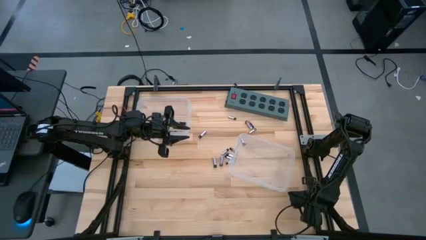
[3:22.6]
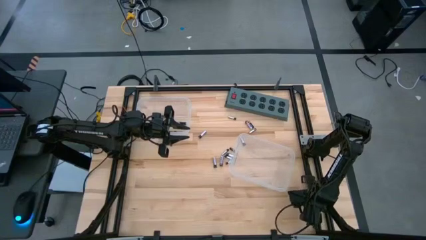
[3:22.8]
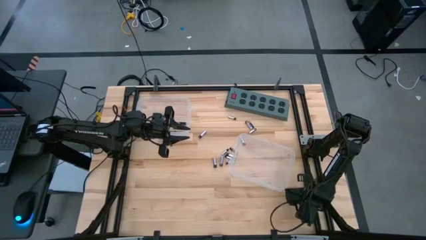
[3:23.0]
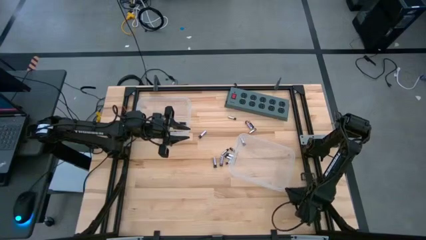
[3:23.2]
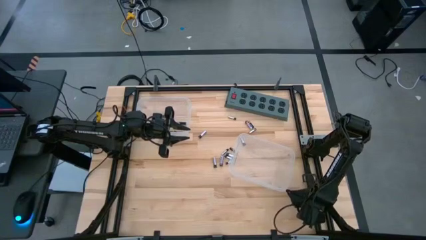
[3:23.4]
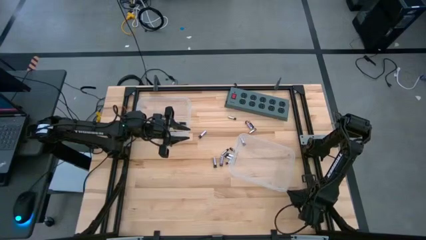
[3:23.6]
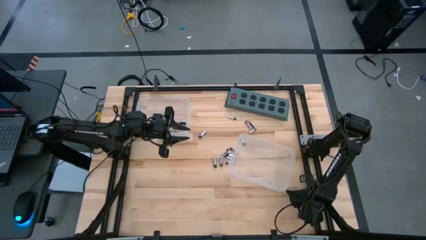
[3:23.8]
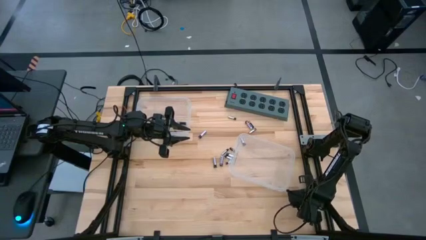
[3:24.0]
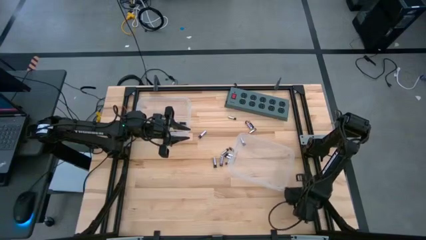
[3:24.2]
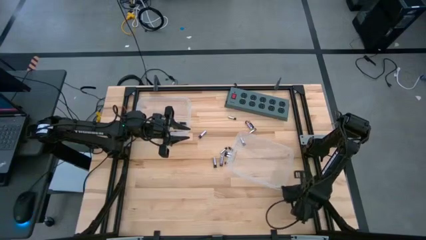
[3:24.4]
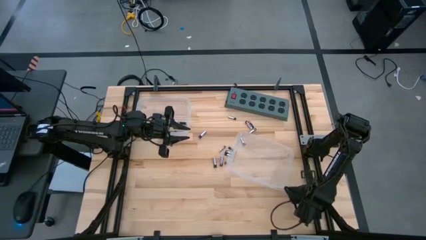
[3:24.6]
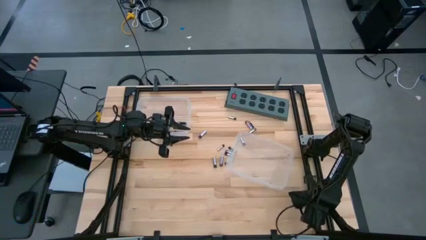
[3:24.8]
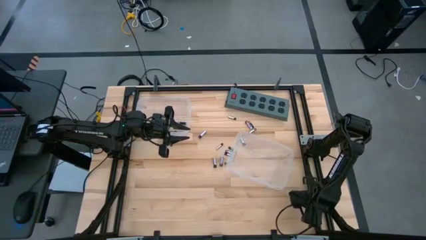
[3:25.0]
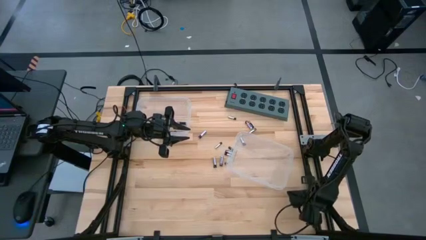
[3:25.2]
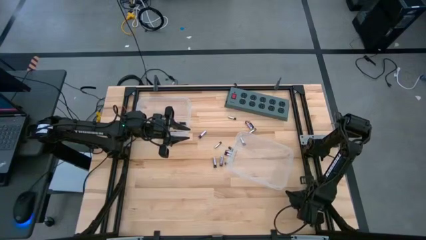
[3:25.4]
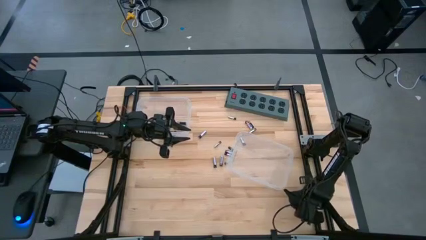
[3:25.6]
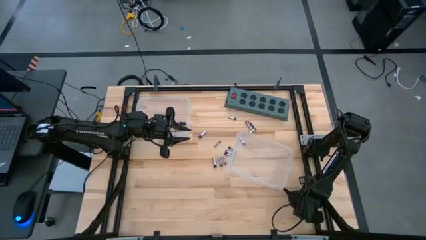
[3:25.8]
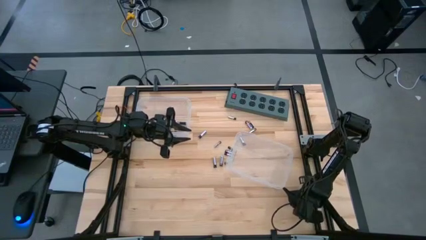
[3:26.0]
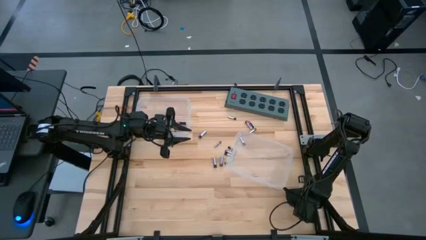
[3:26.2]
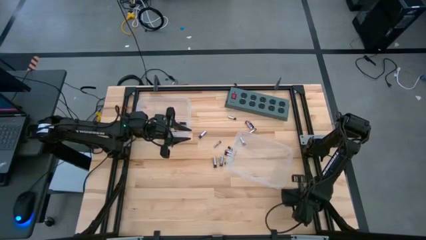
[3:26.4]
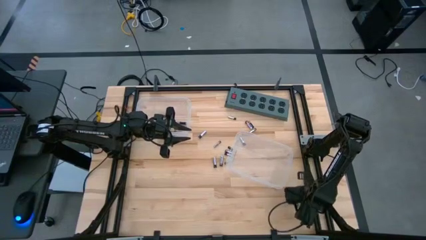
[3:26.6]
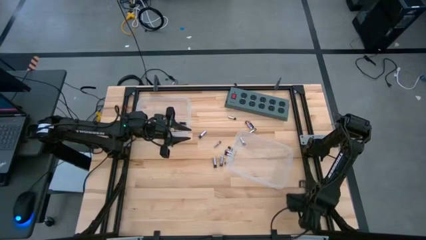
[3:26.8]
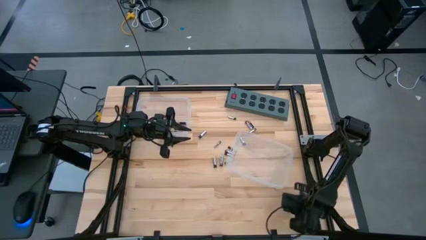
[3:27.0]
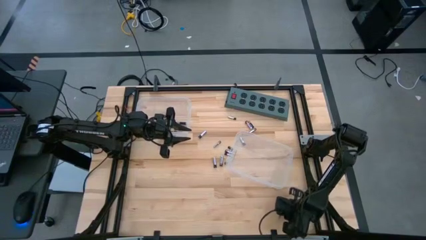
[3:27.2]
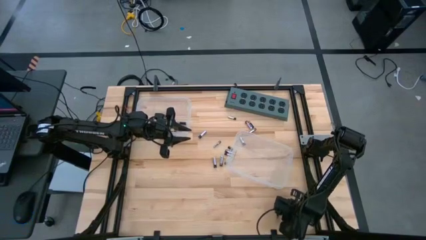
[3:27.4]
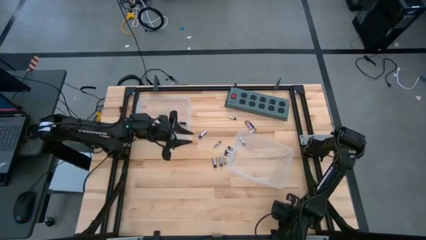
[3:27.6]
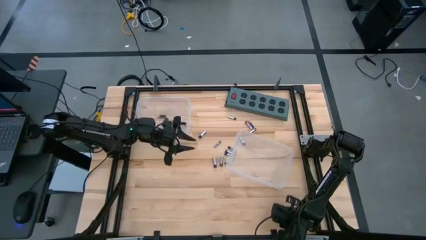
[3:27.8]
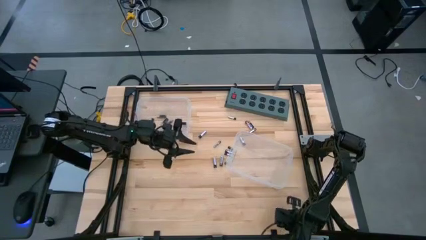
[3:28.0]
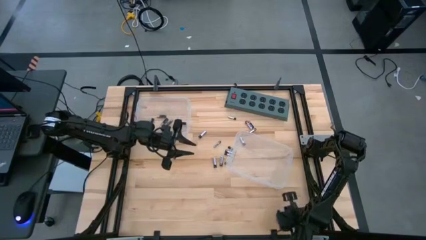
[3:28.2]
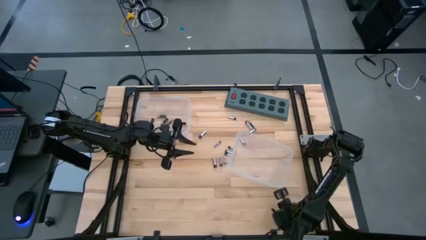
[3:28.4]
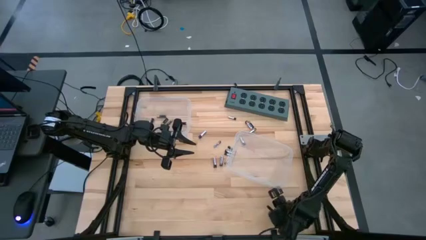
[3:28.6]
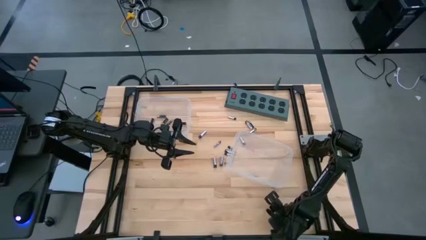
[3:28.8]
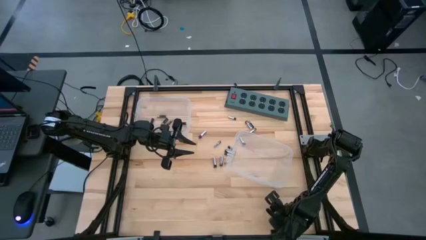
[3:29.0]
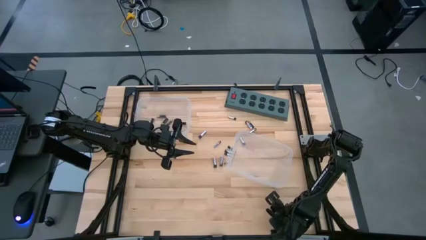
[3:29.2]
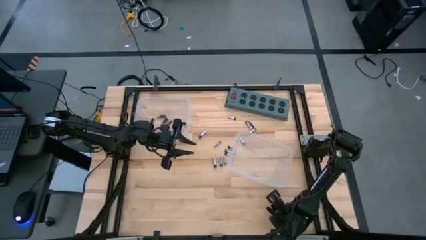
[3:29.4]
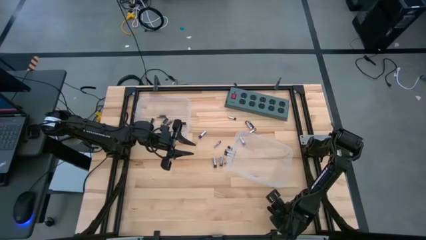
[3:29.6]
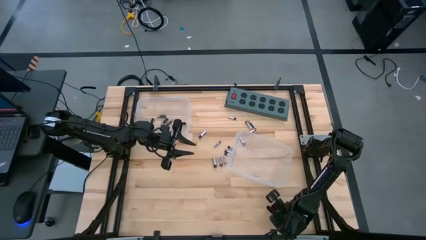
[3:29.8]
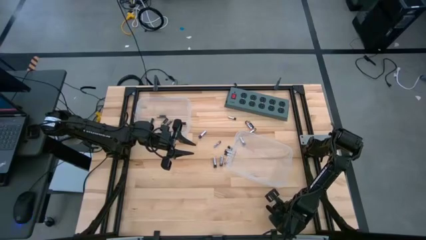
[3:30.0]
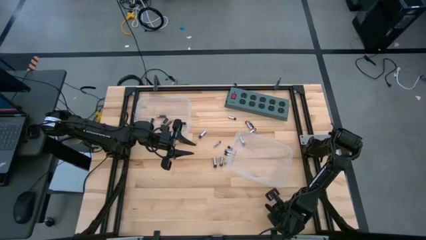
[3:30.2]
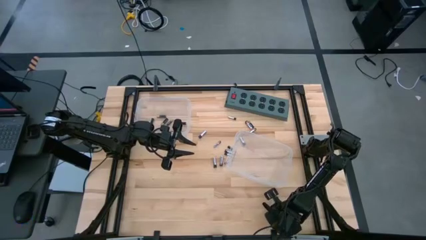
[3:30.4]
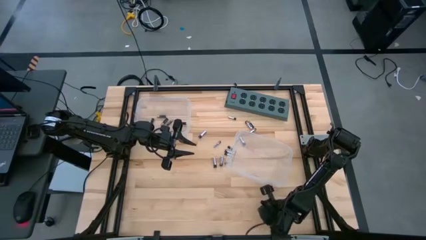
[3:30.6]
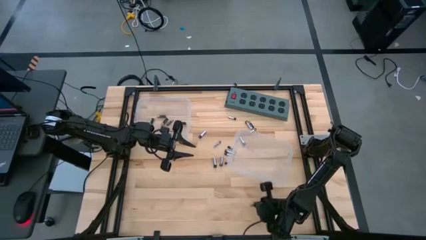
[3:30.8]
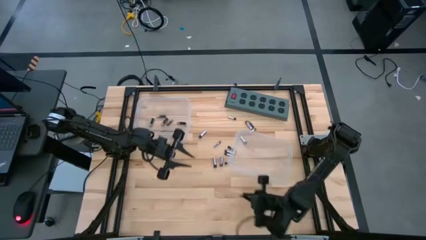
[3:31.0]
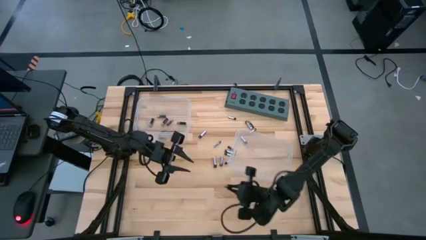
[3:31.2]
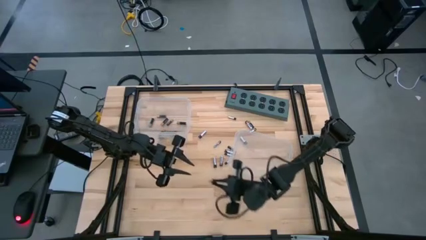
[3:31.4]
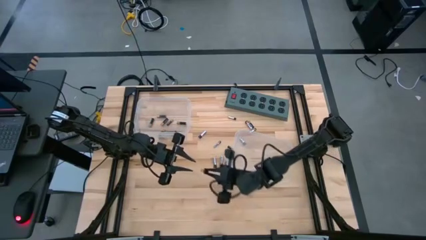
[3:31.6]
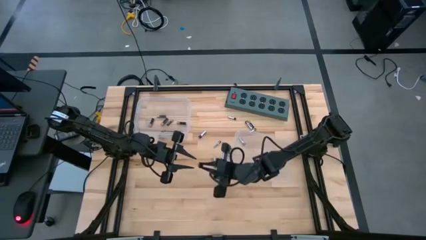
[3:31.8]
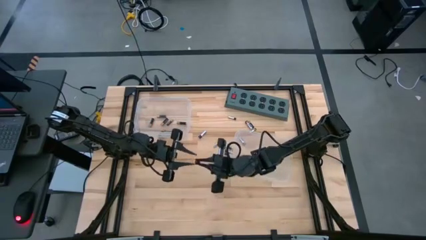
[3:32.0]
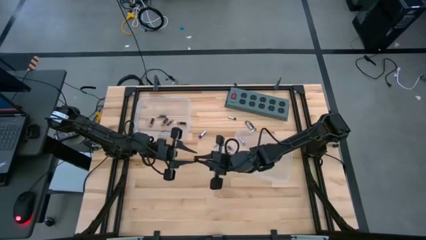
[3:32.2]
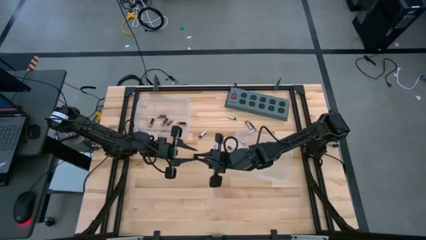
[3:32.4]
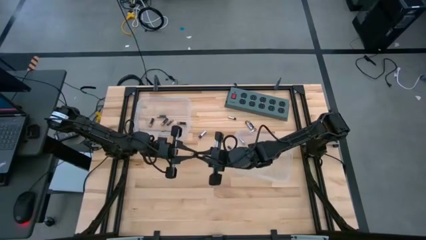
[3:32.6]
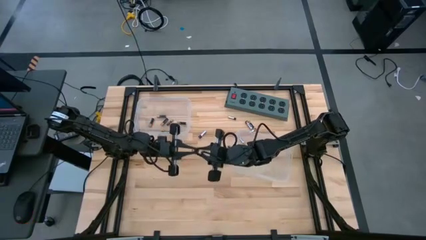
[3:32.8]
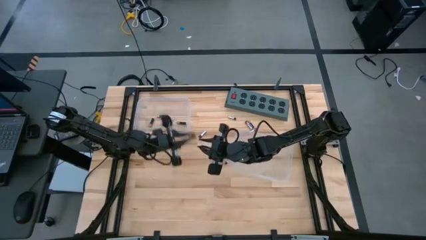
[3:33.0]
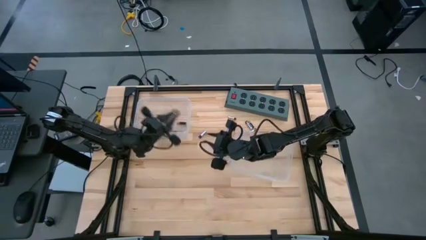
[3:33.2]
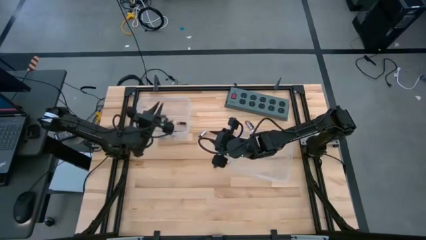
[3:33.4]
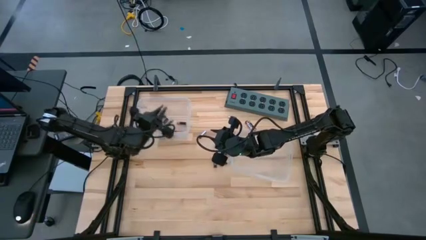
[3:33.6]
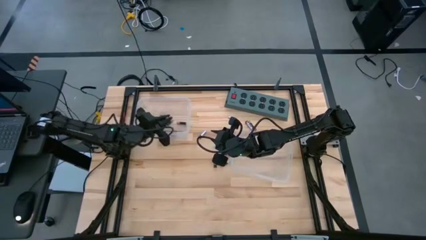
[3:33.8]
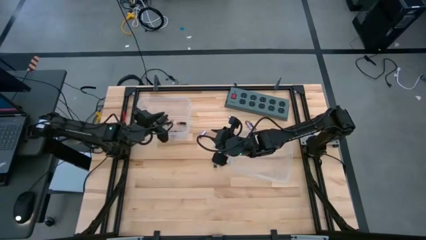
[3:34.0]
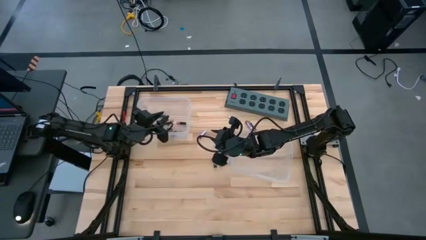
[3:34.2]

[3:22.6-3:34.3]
Task: Sort batteries
Put the black battery into the top transparent bin
